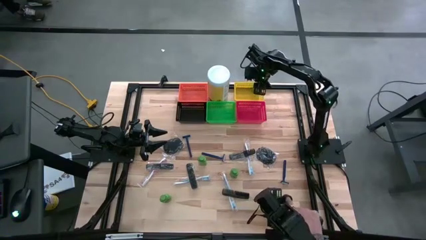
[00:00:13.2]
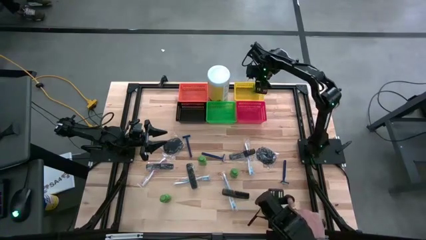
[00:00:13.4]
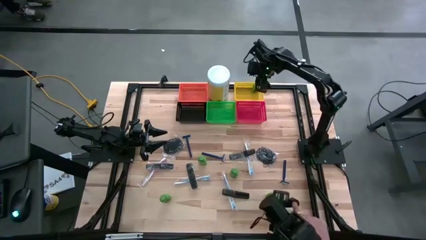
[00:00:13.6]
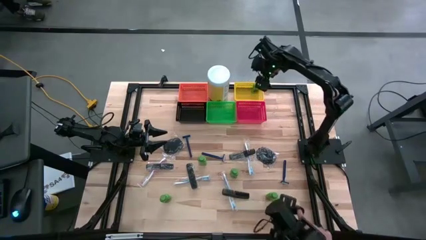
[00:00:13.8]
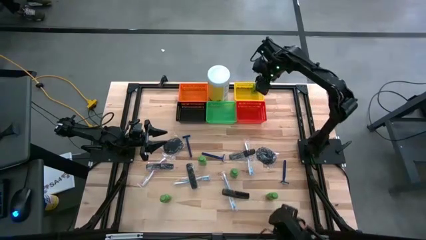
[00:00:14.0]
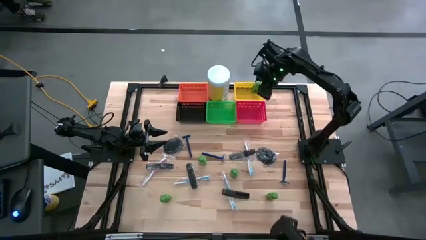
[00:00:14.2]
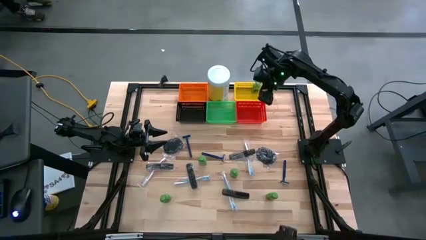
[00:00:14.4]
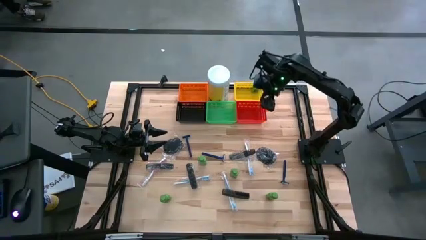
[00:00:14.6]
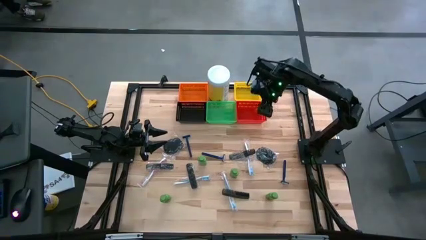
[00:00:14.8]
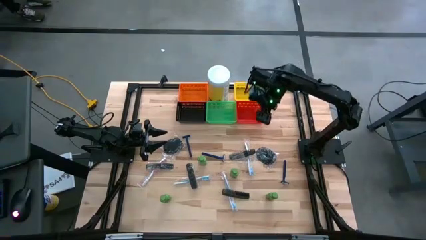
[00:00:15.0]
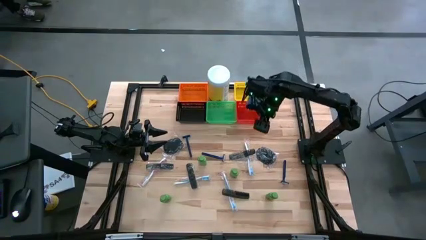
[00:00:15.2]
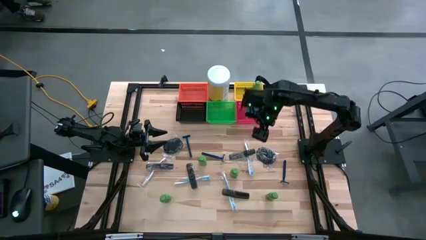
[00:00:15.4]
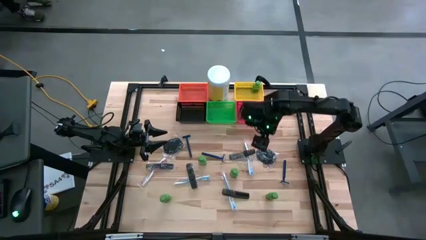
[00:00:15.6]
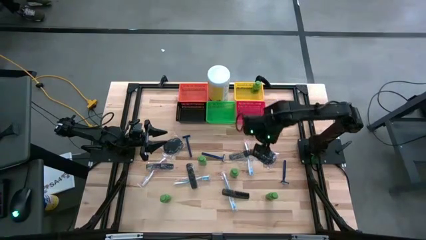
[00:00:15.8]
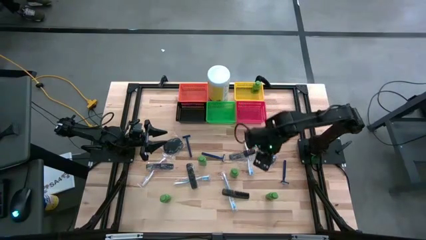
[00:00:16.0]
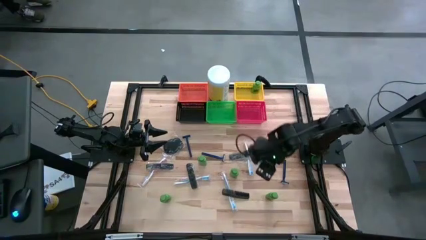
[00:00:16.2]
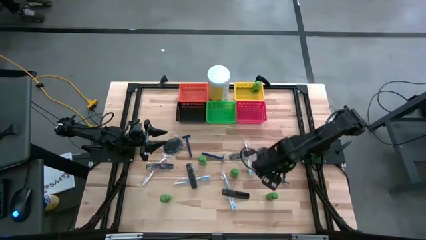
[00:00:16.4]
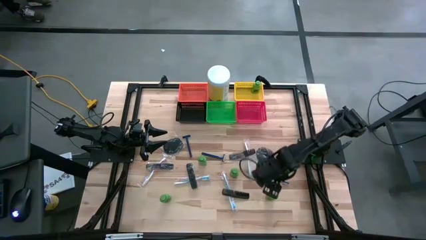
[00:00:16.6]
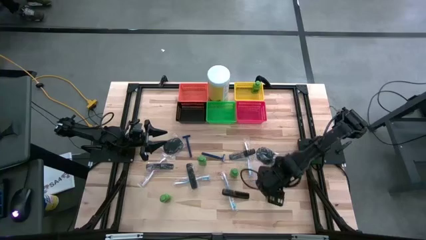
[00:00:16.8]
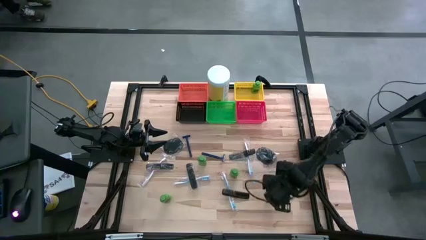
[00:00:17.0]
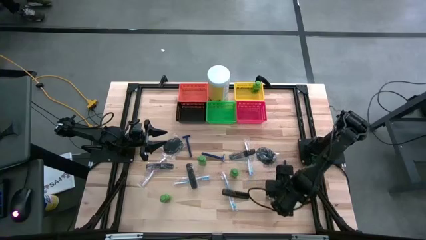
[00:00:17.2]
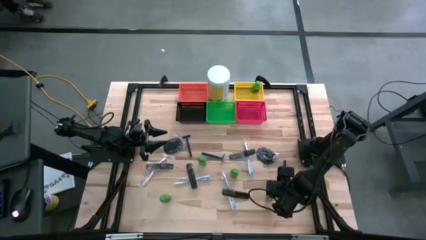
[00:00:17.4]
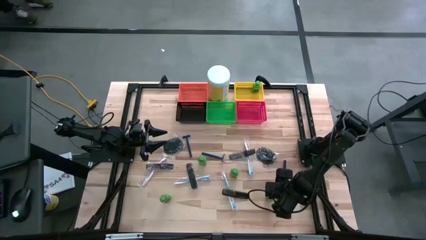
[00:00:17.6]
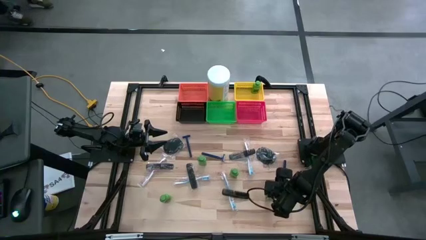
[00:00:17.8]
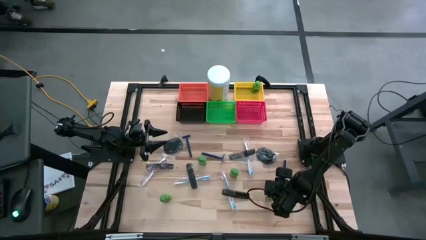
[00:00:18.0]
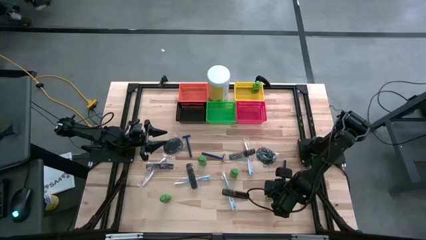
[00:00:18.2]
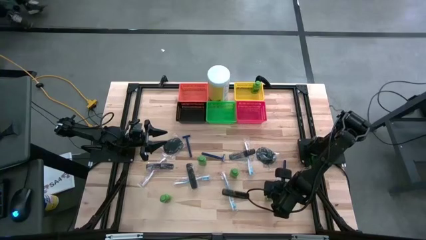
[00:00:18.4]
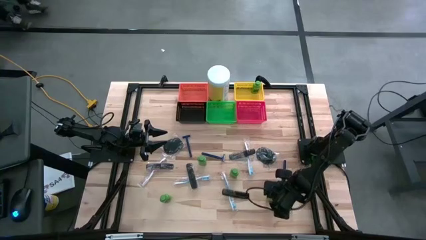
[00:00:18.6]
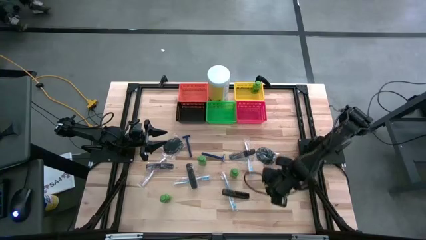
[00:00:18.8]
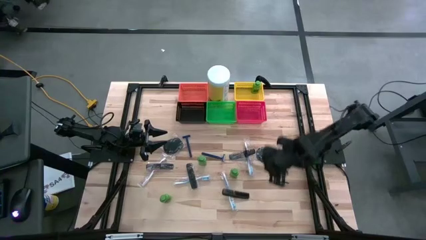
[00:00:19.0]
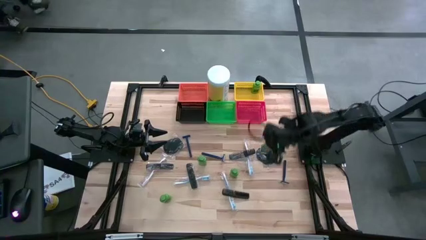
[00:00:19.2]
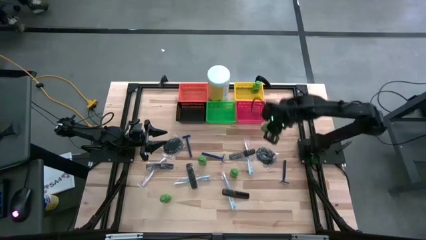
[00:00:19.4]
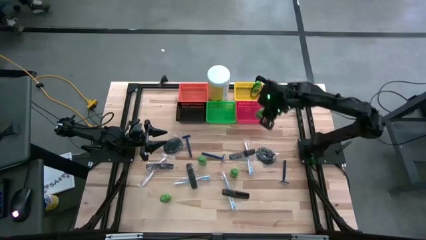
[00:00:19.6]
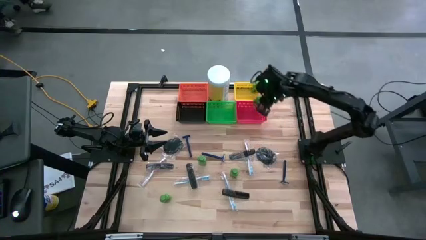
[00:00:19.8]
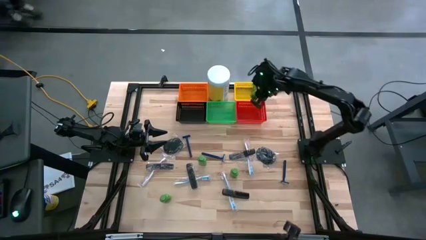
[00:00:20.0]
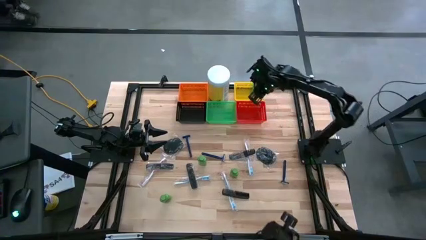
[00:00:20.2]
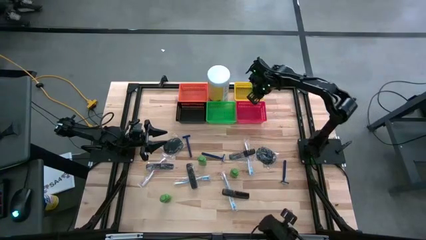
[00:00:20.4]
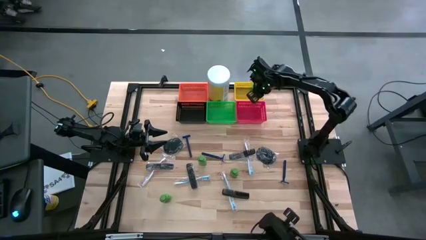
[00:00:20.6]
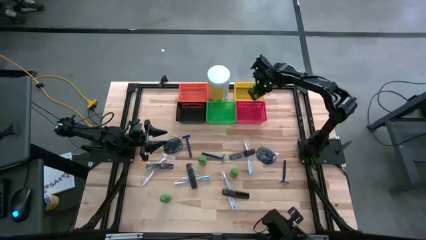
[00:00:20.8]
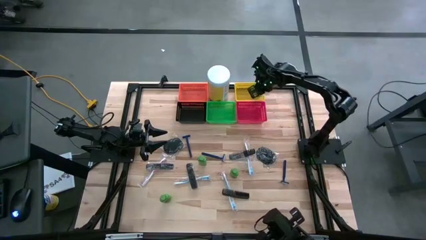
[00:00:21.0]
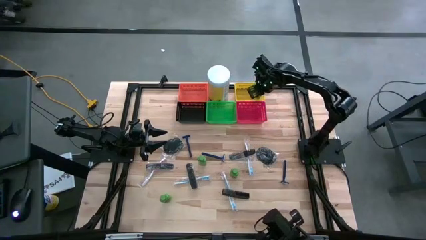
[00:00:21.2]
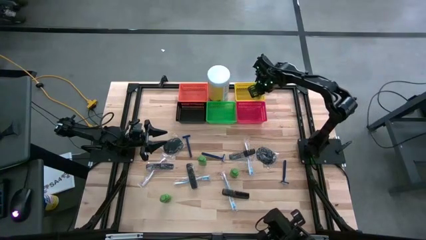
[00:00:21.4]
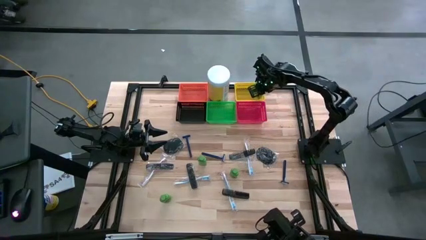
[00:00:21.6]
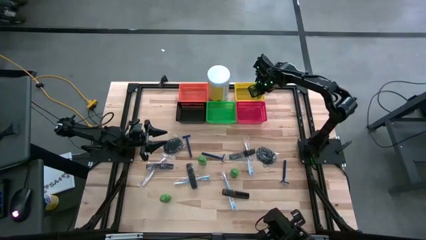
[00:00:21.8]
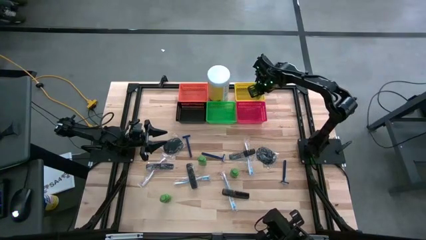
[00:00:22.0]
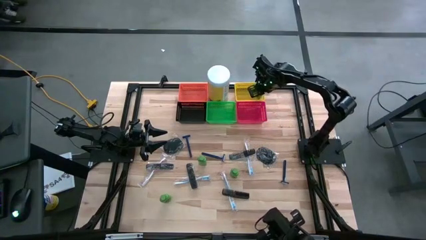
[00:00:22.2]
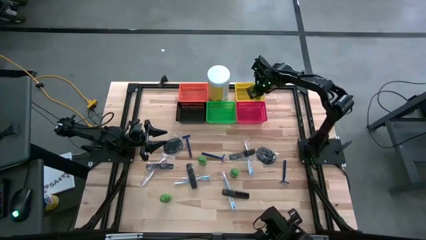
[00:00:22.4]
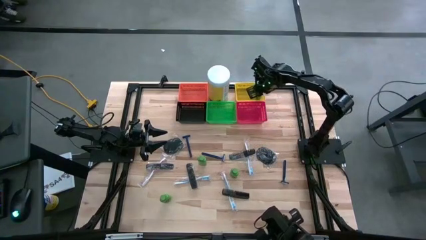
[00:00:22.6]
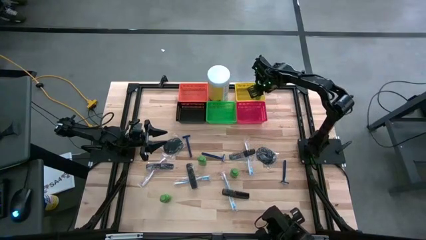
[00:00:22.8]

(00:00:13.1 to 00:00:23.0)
Task: Pick & Place Travel size toiletries
Put the green shampoo into the yellow bin
